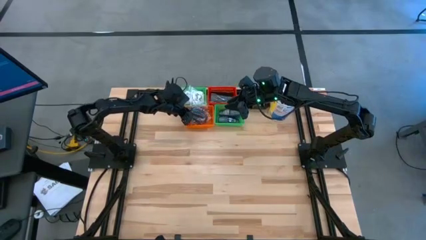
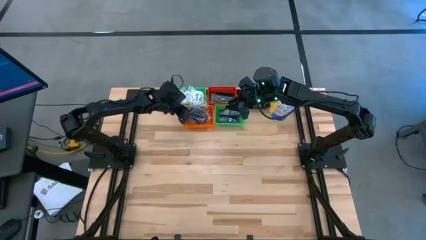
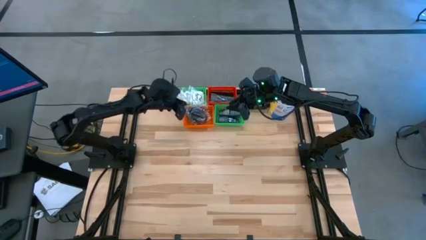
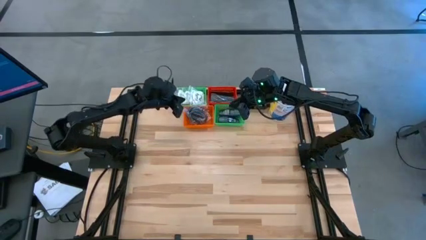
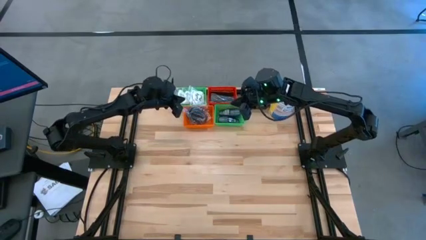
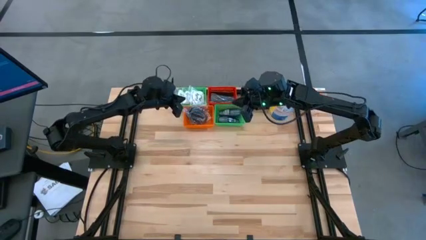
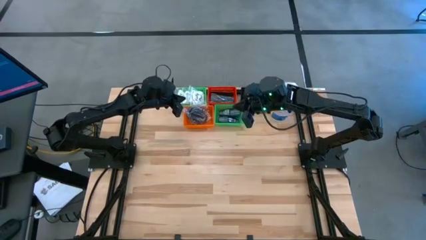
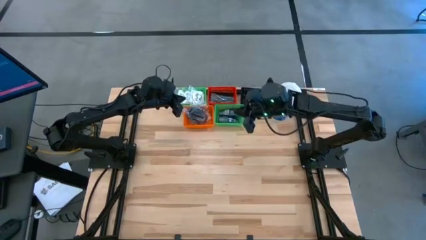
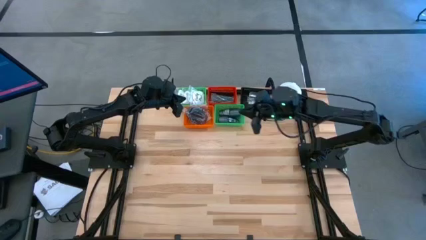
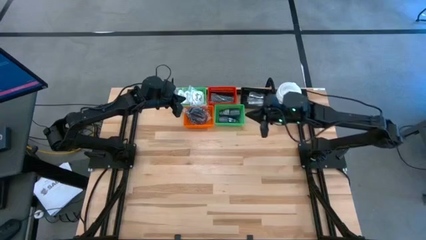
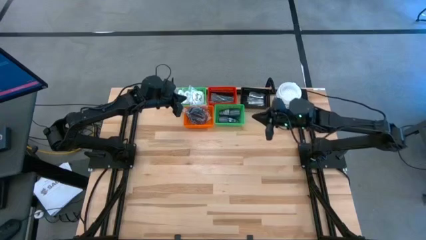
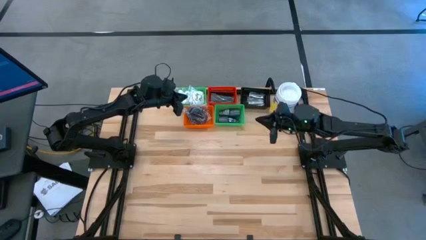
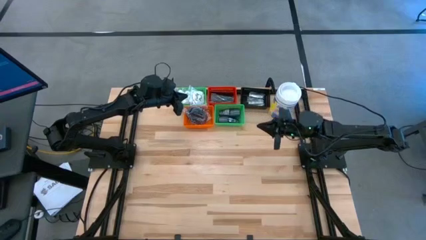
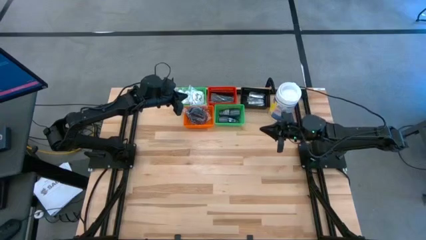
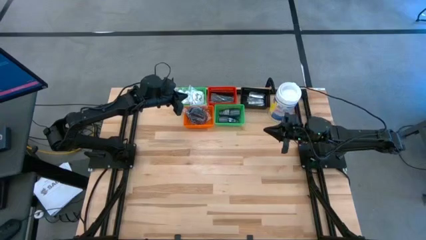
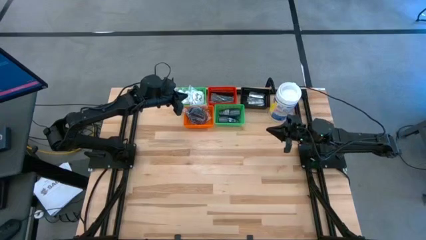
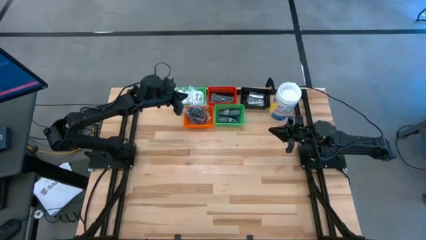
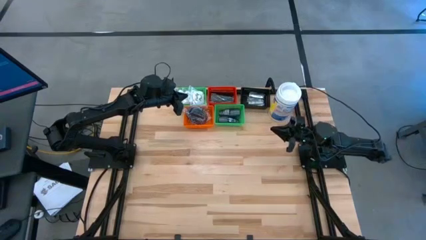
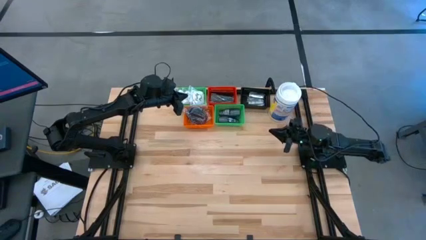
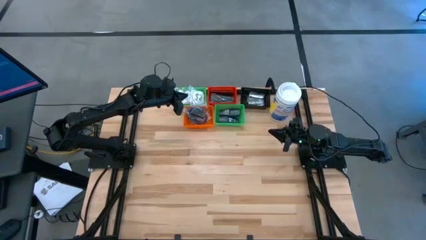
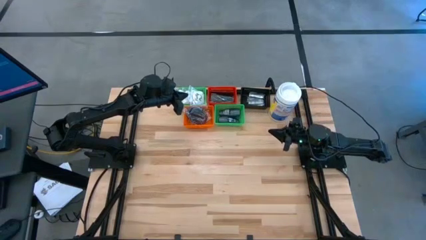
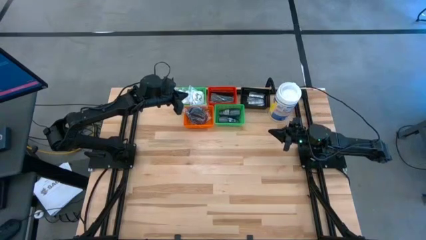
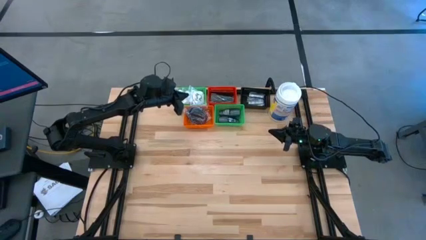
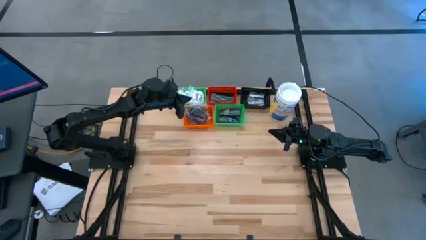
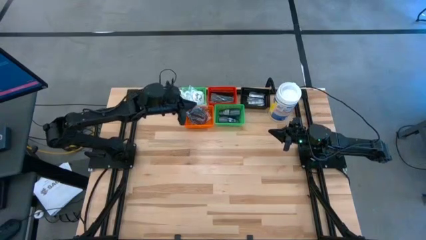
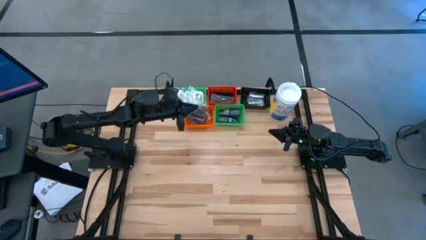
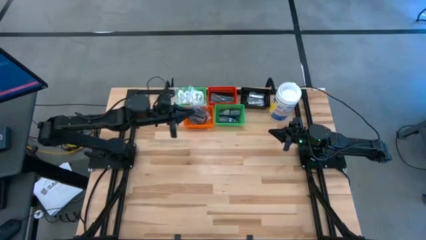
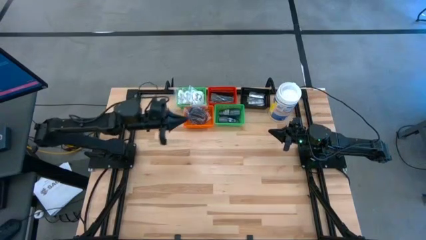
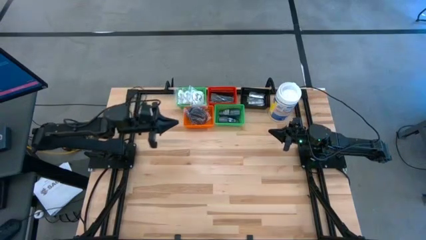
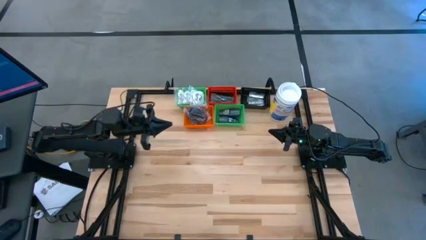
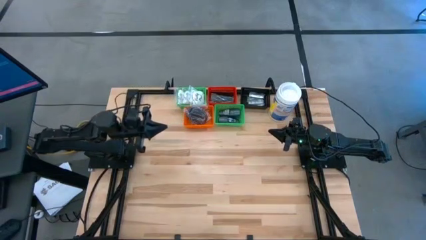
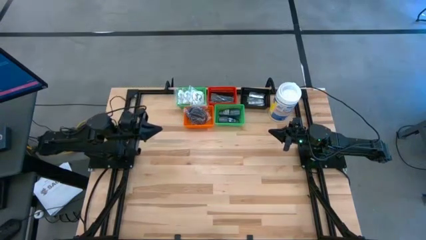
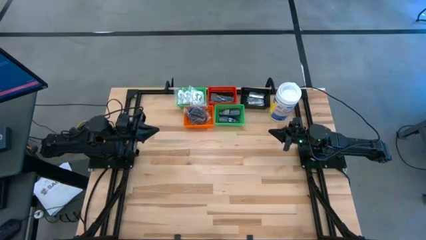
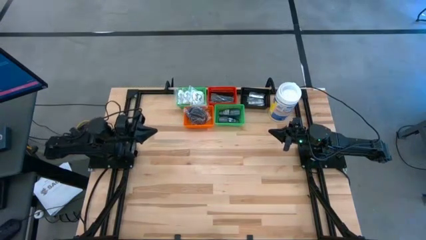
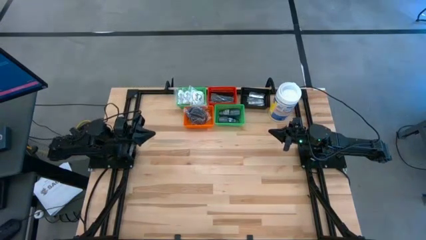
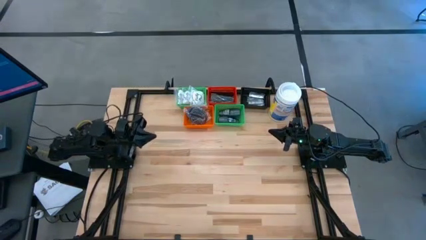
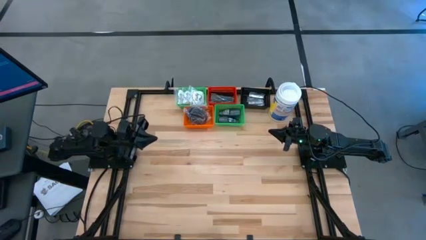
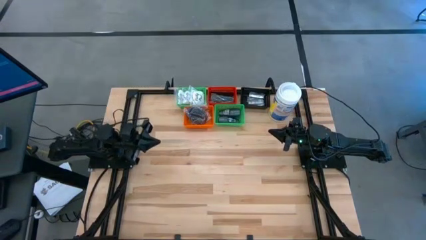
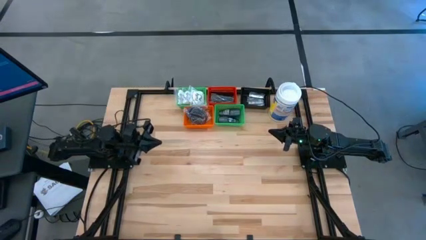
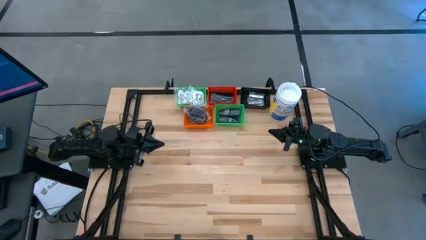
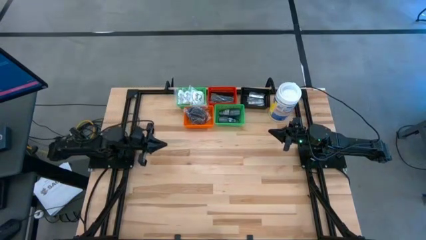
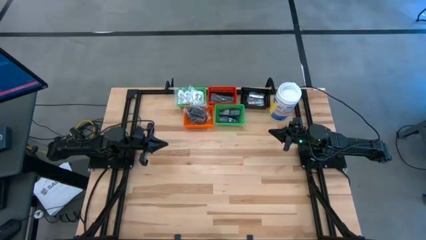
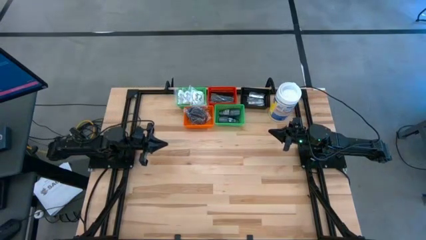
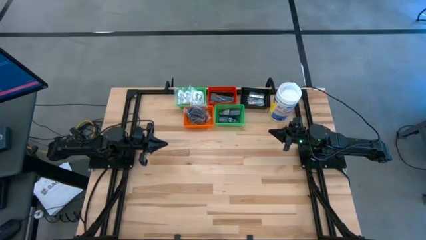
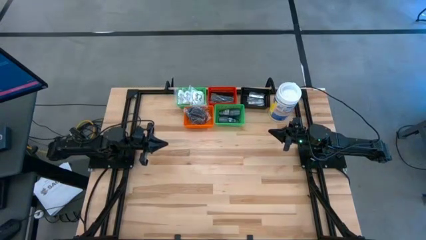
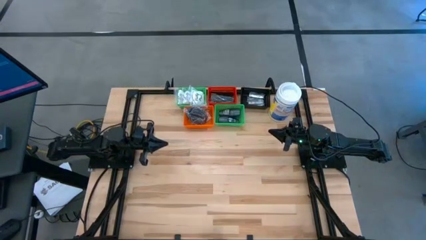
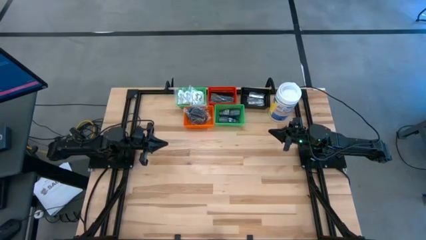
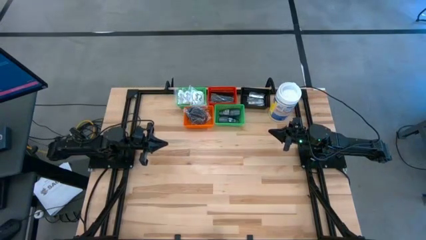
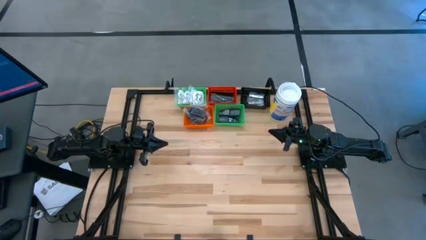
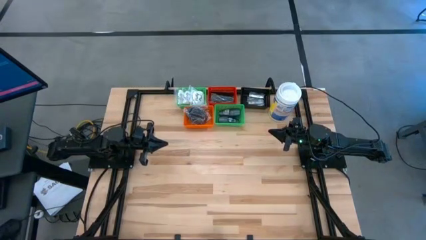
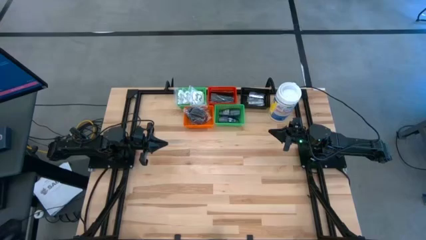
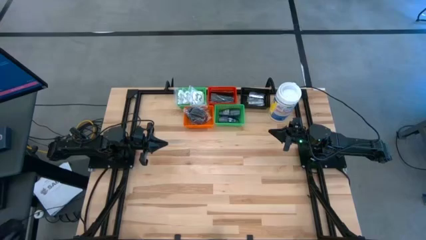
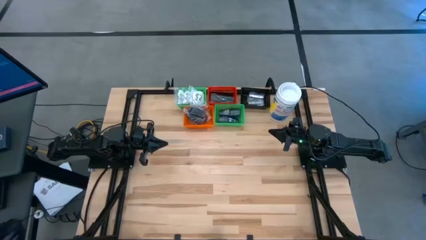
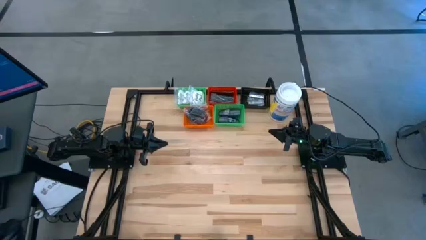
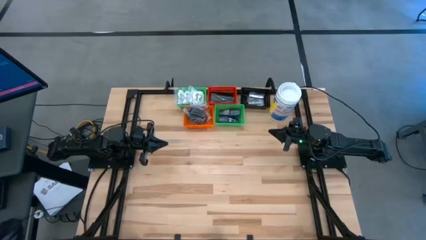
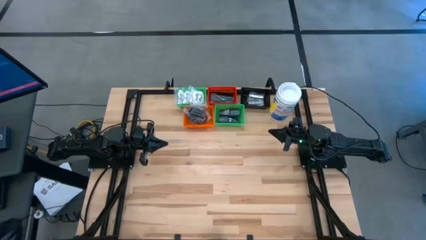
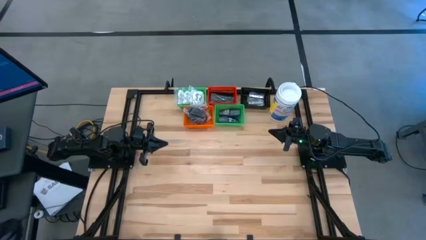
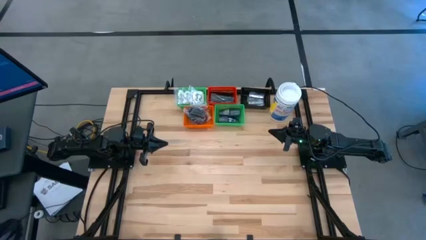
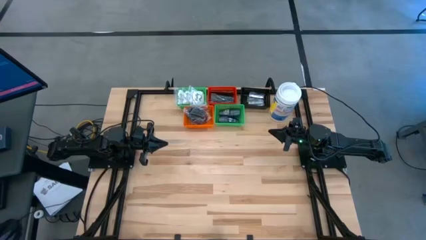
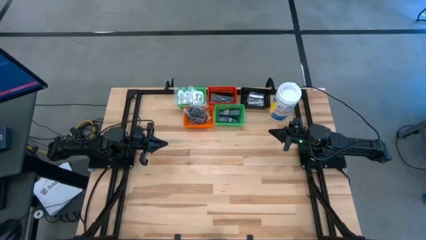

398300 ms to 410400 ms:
Task: Pick & Place Travel size toiletries
Return to Home Position

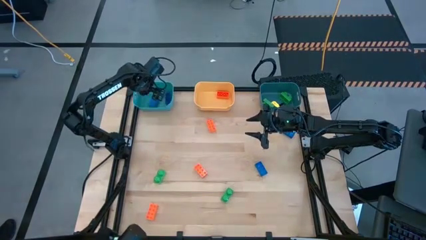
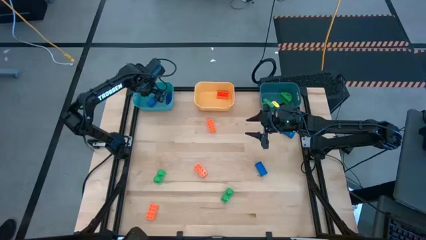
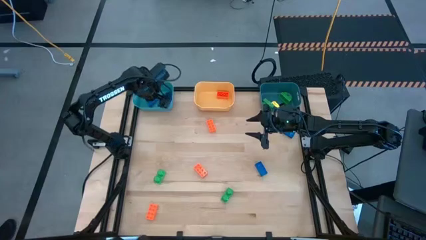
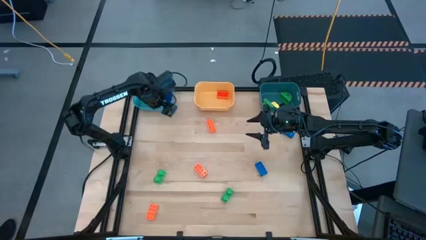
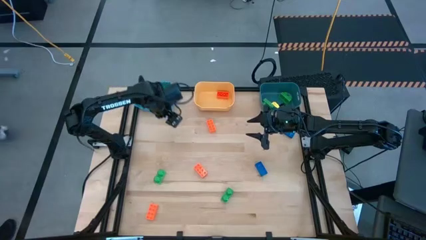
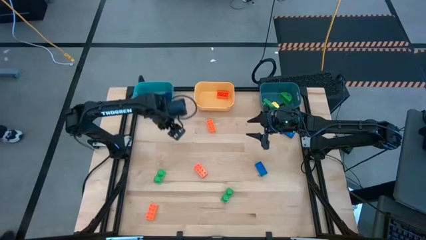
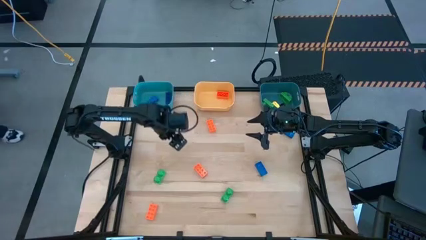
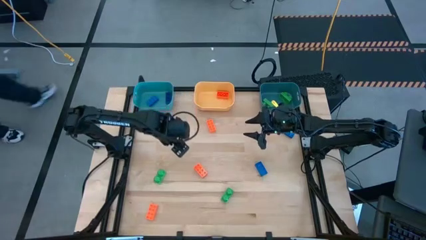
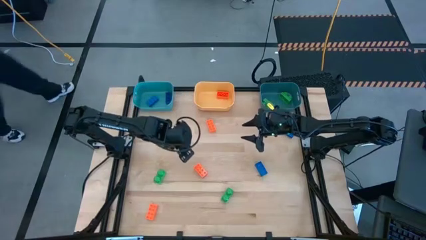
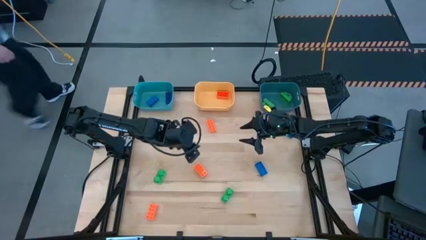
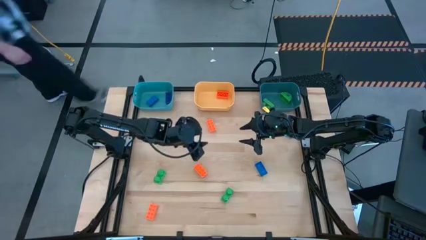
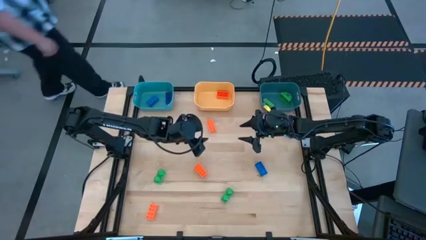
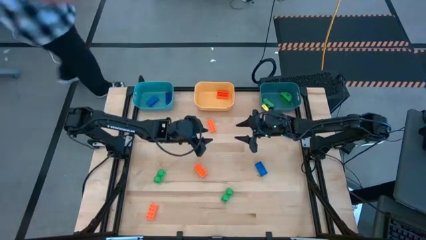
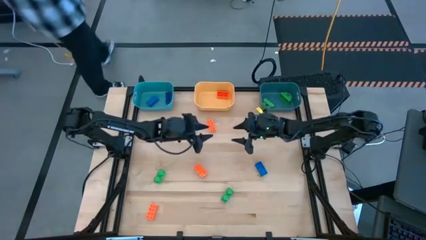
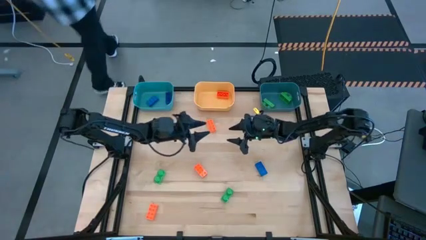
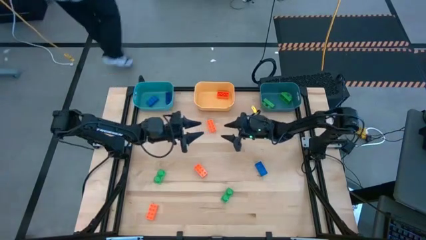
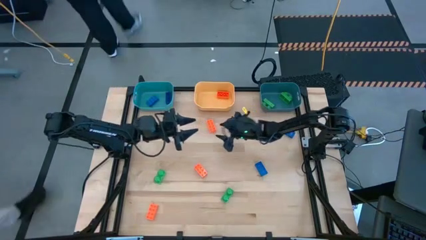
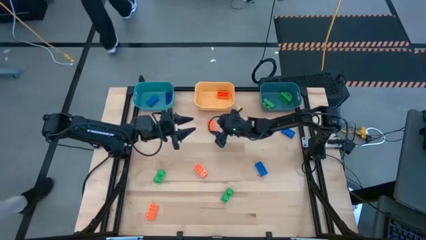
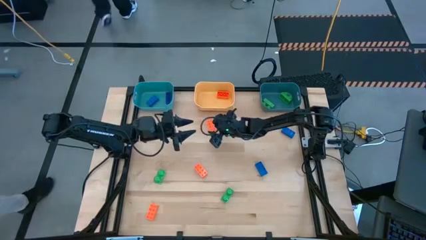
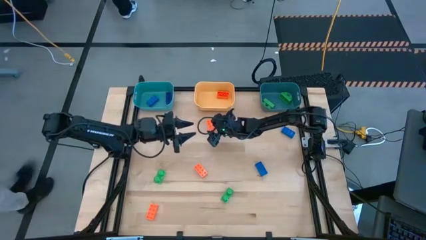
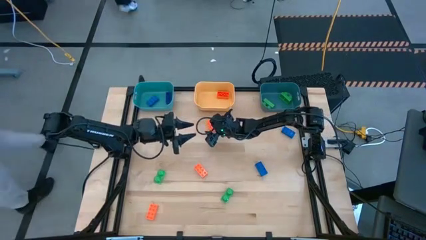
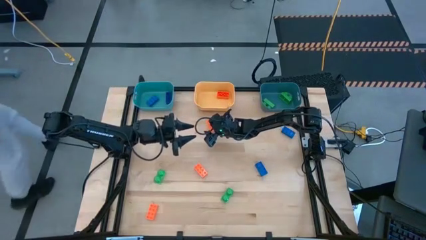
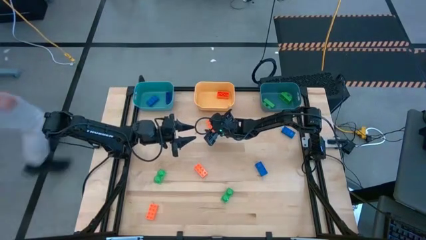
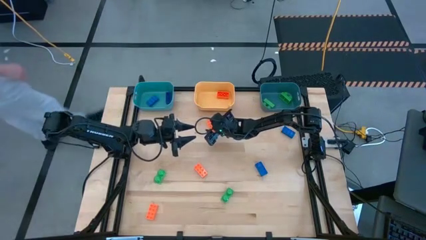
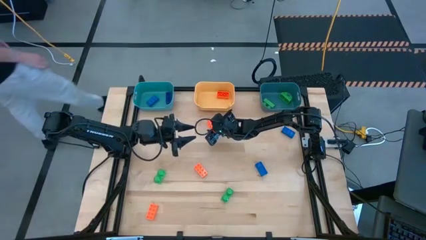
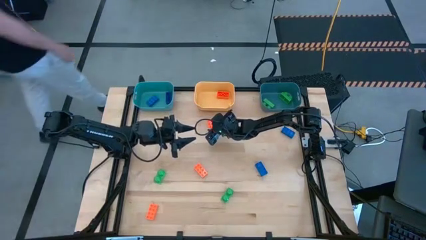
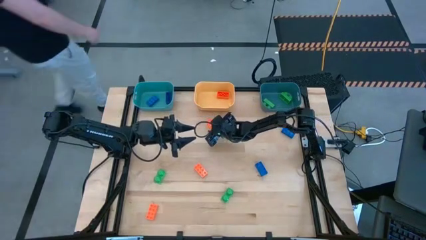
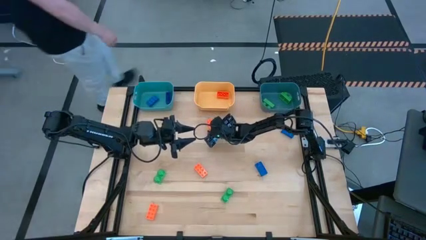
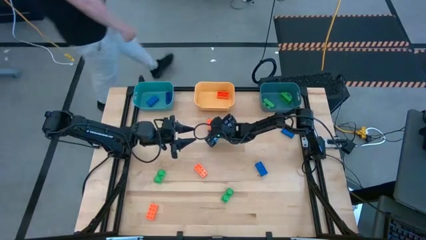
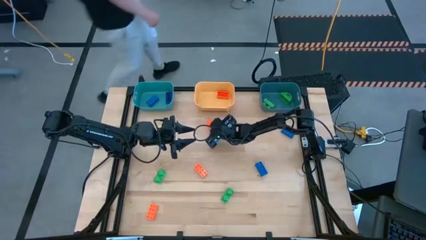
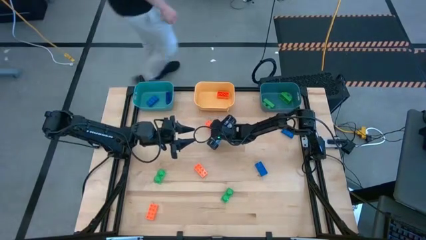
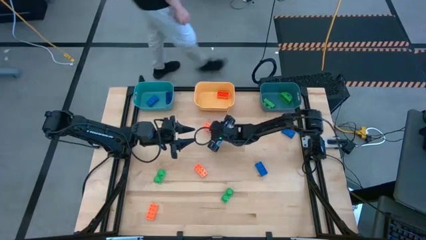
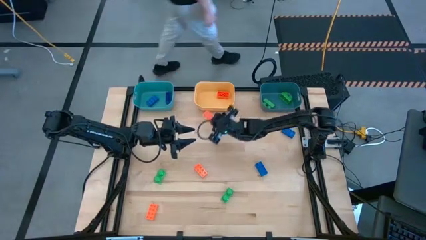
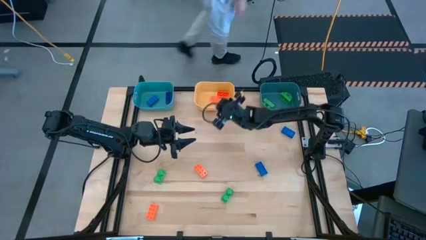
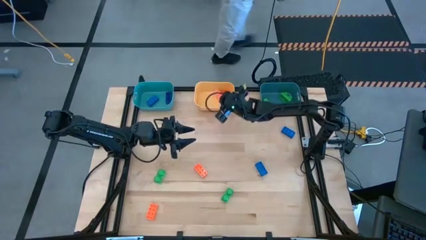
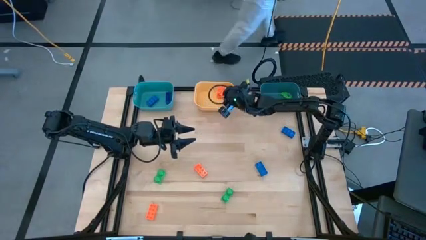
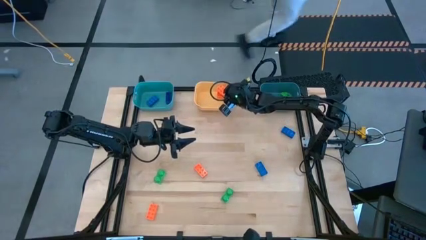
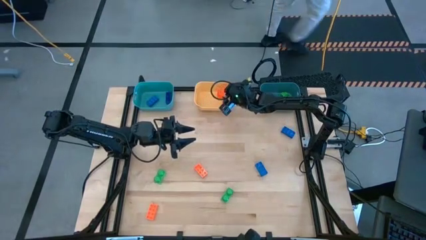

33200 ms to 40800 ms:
Task: Sort & place blocks by color
Put the orange game piece into the yellow bin
